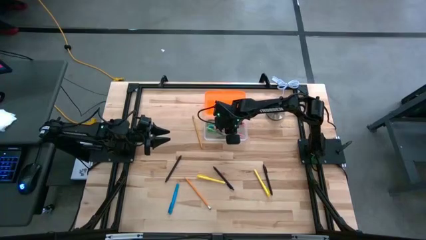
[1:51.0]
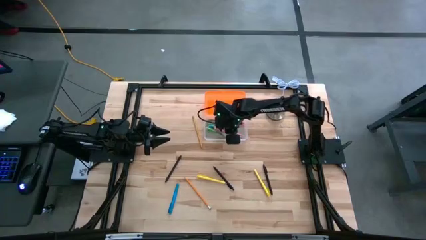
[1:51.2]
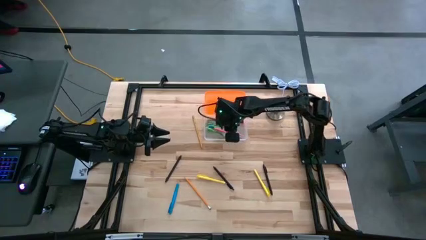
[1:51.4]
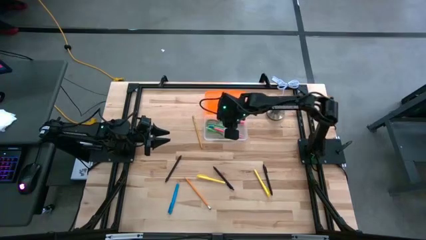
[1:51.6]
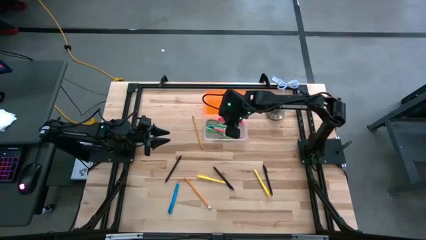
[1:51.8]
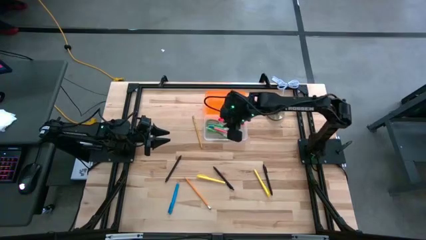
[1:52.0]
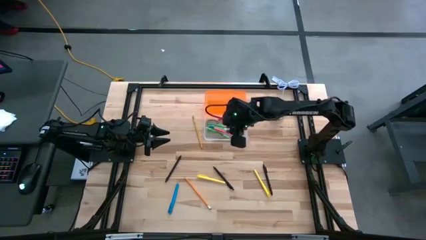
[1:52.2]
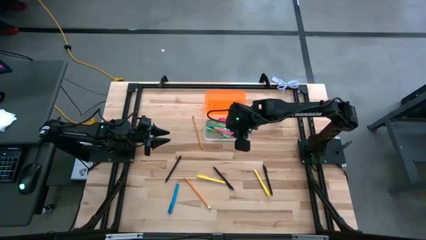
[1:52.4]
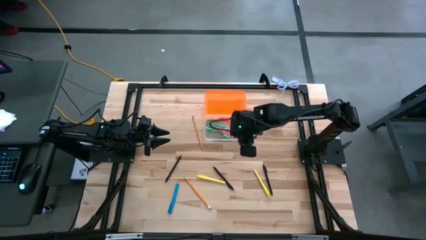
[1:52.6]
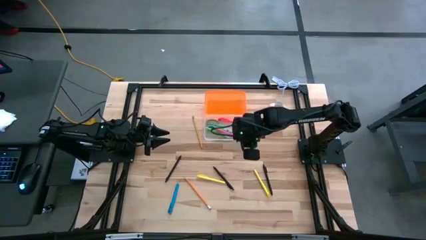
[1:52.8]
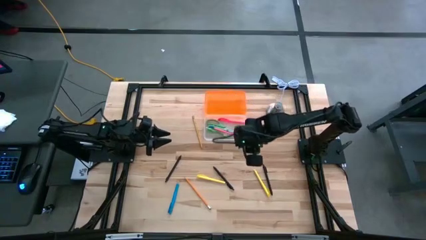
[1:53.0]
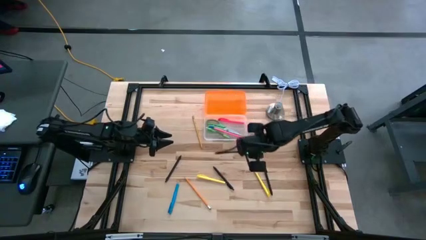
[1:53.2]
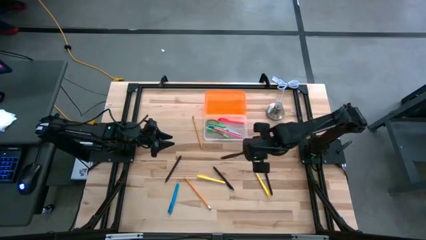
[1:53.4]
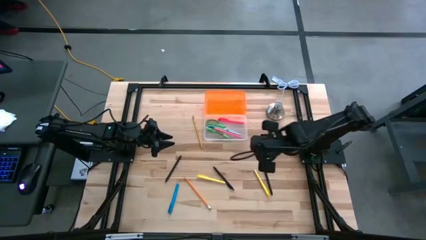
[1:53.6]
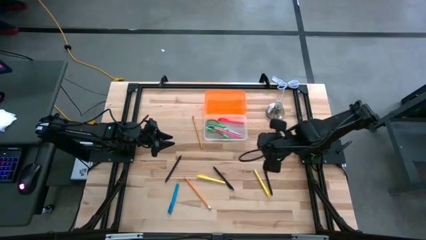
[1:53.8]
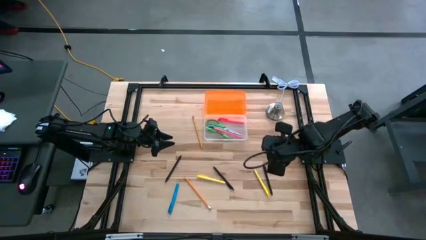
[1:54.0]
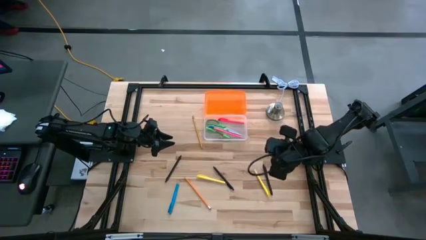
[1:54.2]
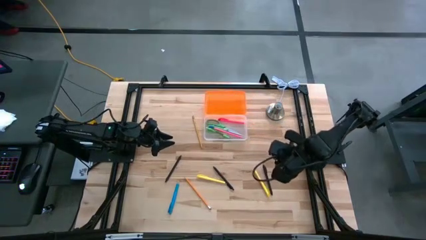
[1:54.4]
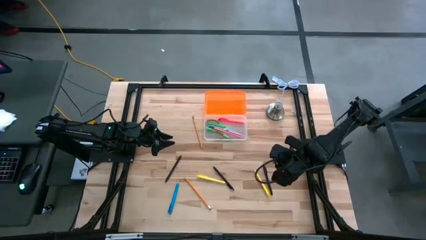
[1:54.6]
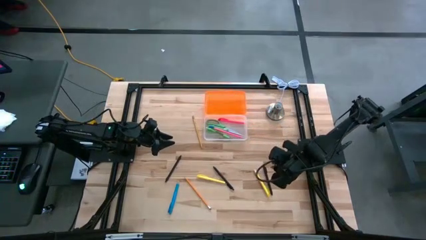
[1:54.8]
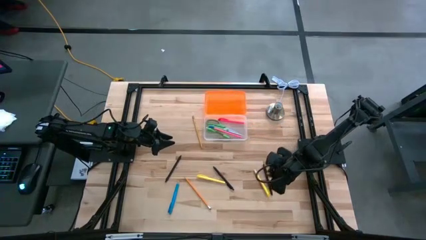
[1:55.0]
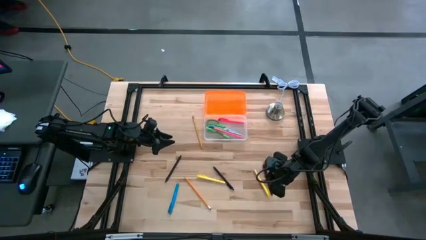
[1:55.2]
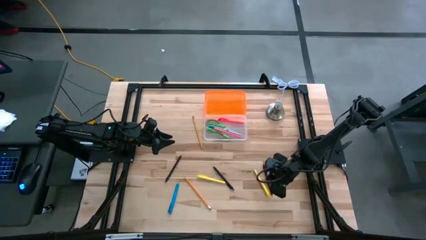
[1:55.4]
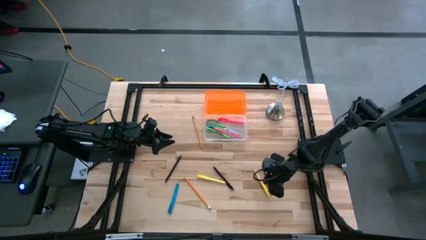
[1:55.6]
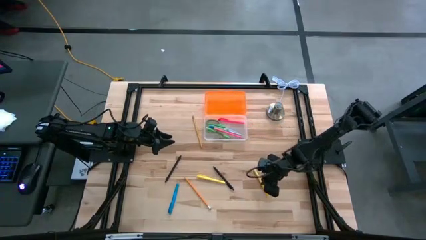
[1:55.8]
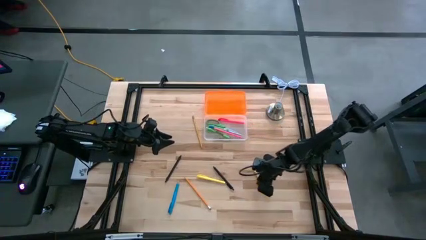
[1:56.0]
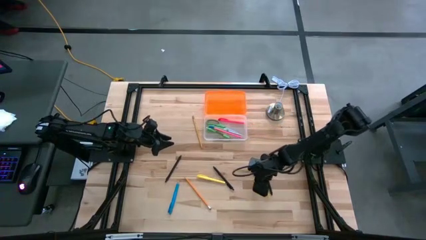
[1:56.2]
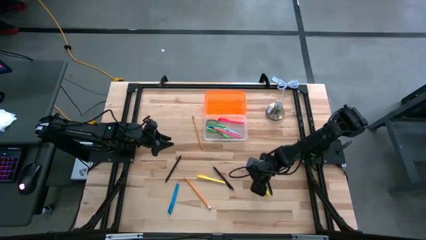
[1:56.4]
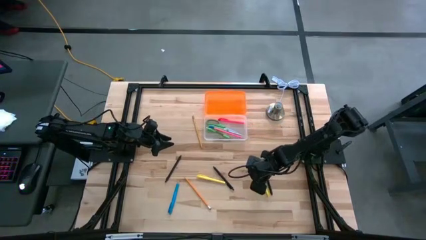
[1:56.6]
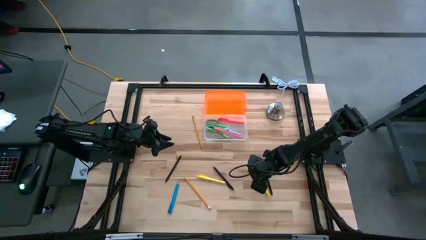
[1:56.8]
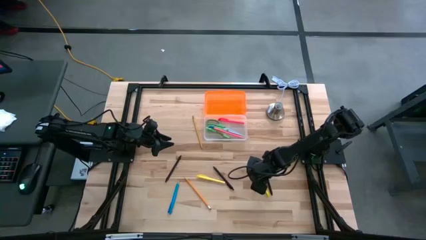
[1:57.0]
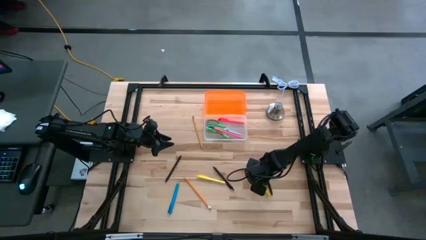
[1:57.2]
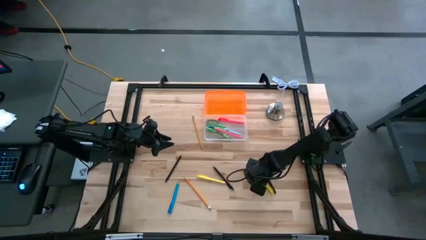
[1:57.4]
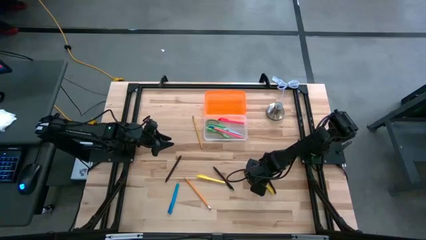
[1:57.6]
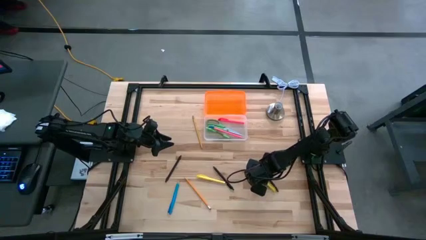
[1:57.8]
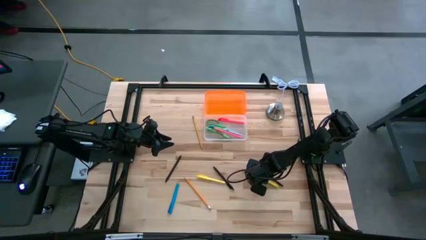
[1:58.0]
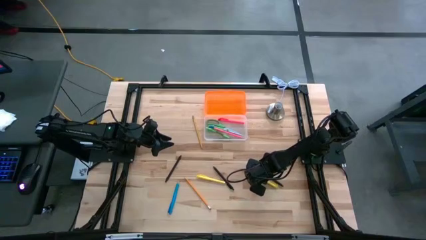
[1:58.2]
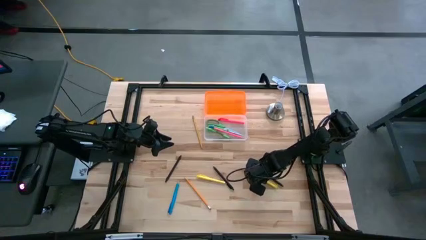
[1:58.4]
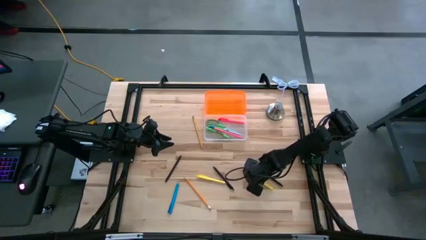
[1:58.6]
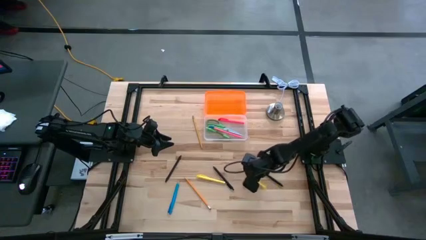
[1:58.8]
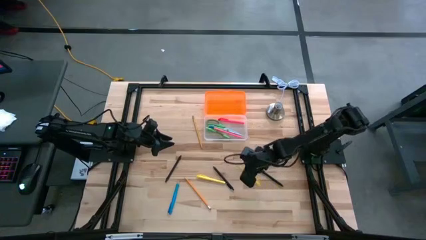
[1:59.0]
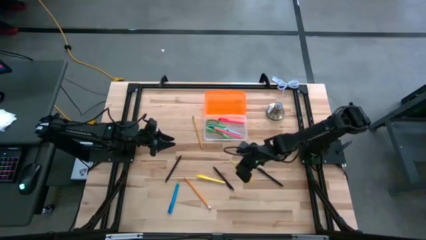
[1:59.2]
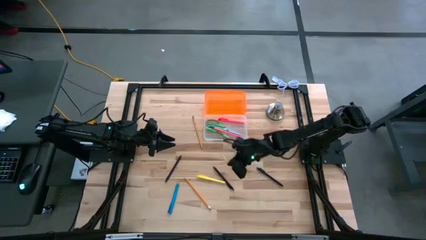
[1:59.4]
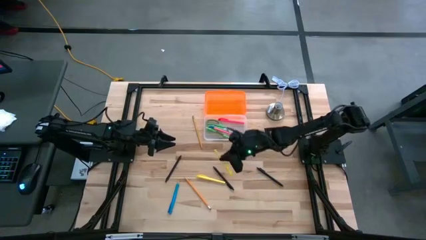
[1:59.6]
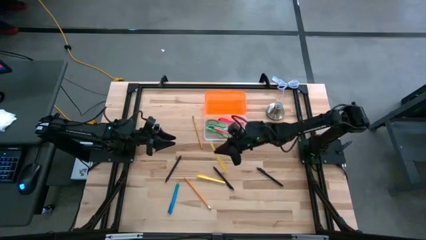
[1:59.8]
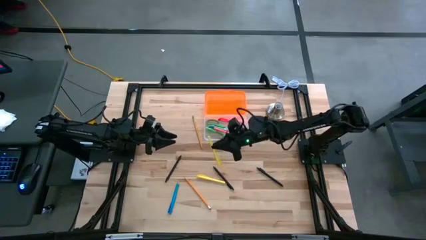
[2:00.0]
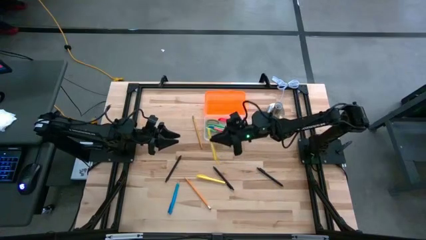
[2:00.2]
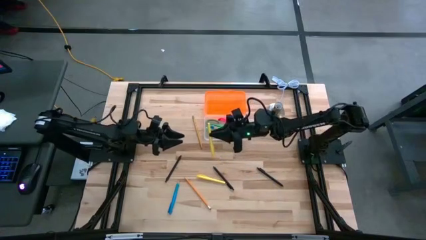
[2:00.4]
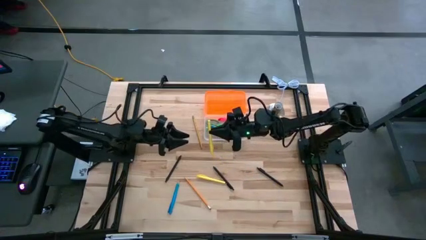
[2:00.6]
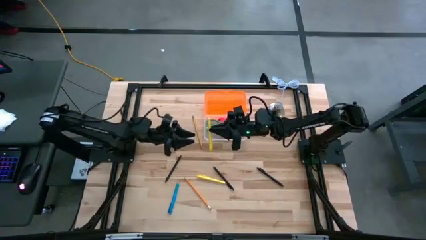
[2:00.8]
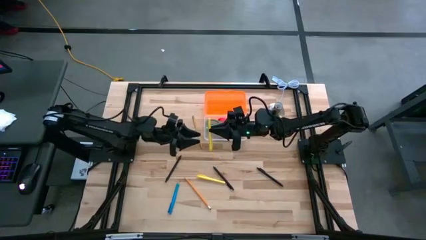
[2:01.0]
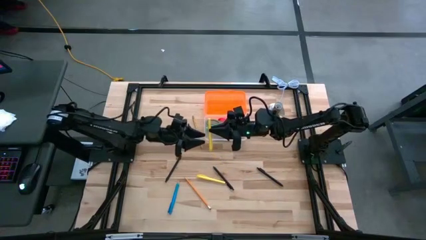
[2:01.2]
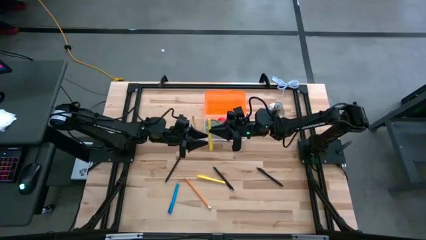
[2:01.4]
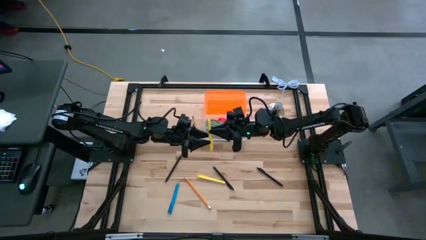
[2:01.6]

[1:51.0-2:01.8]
Task: Pick & place school supplies into a supply box
Put the right yellow highlighter into the supply box

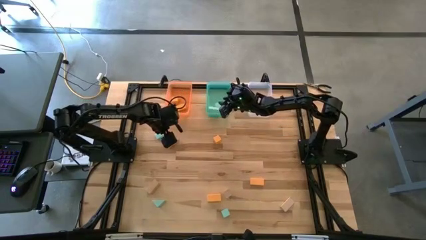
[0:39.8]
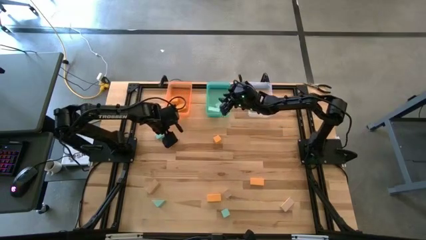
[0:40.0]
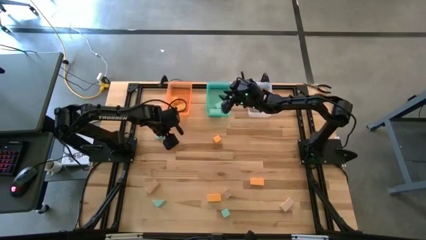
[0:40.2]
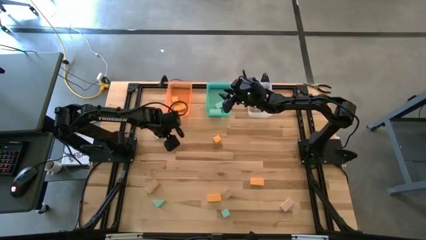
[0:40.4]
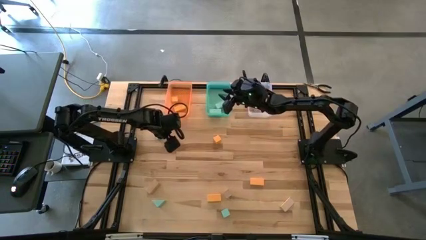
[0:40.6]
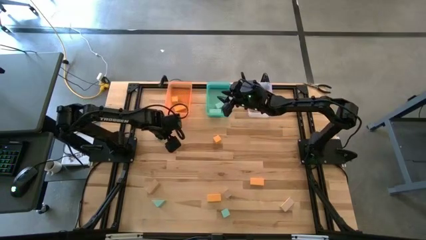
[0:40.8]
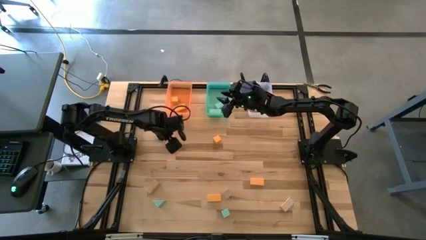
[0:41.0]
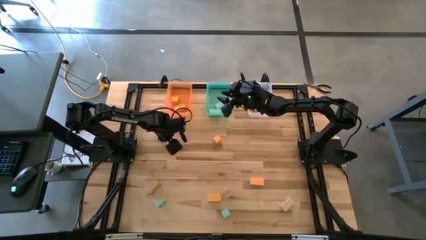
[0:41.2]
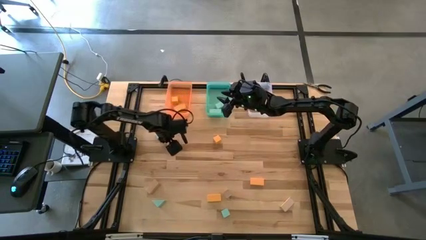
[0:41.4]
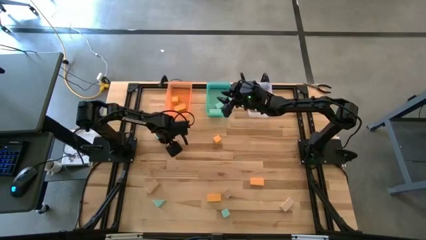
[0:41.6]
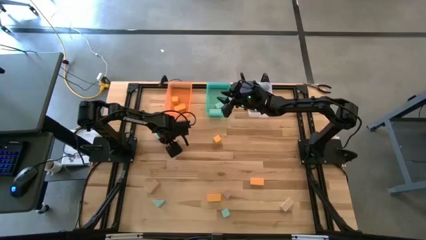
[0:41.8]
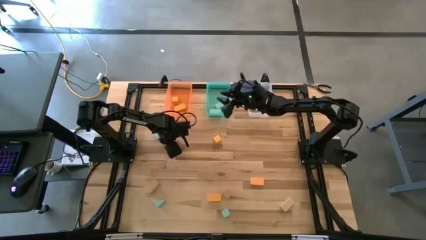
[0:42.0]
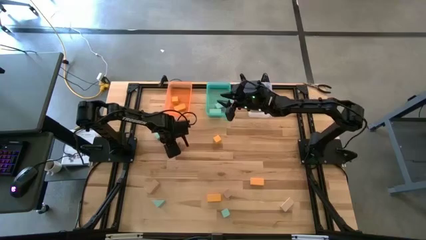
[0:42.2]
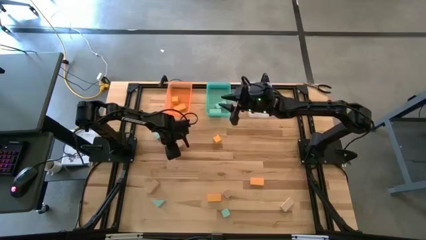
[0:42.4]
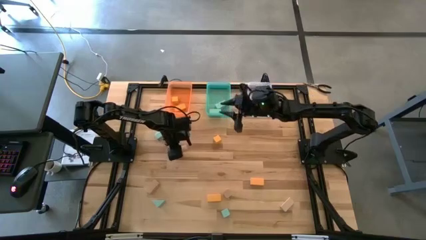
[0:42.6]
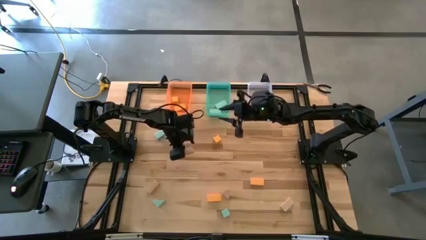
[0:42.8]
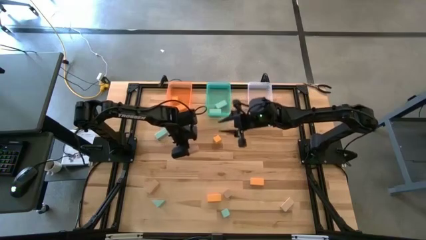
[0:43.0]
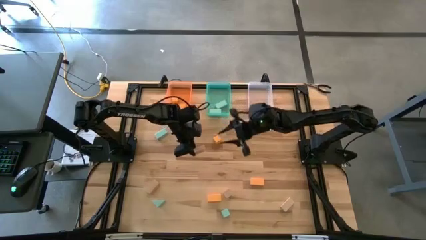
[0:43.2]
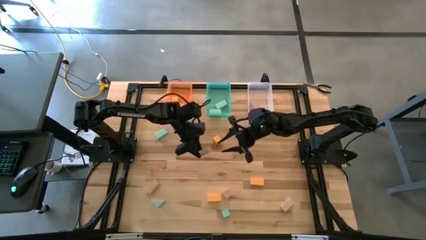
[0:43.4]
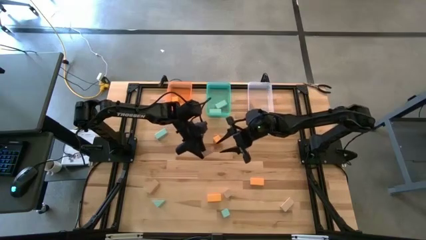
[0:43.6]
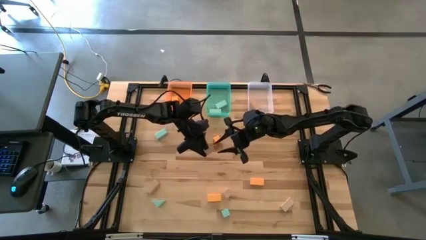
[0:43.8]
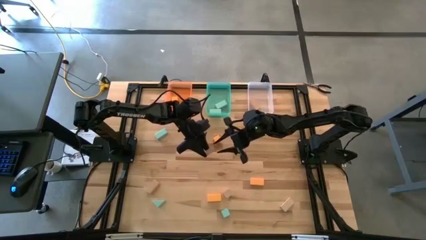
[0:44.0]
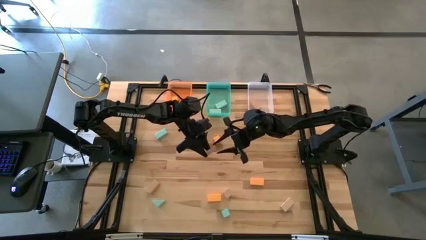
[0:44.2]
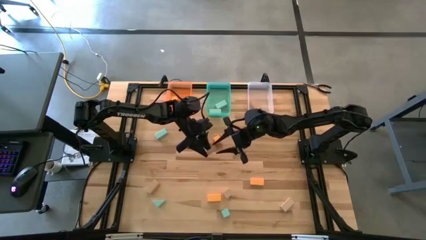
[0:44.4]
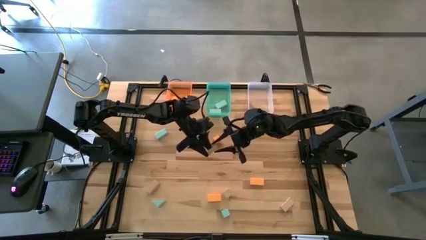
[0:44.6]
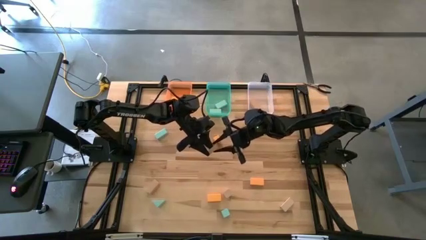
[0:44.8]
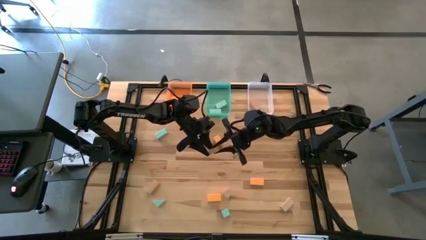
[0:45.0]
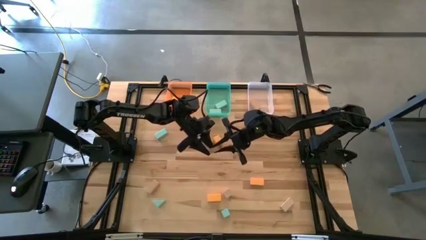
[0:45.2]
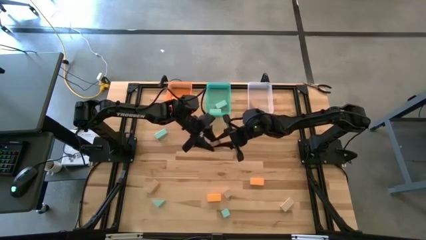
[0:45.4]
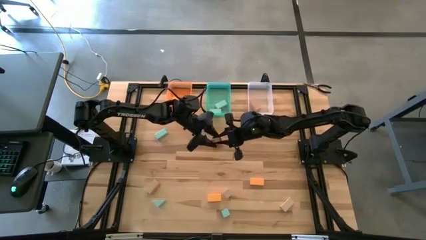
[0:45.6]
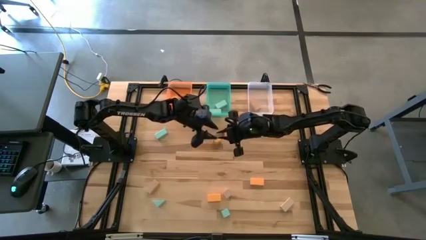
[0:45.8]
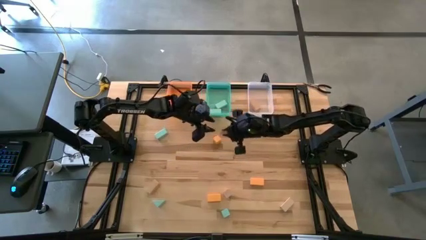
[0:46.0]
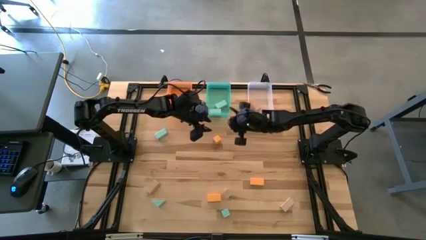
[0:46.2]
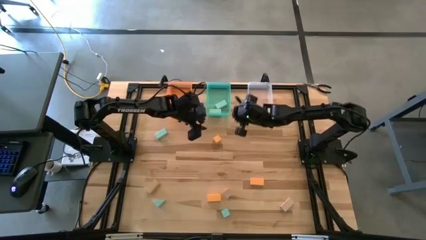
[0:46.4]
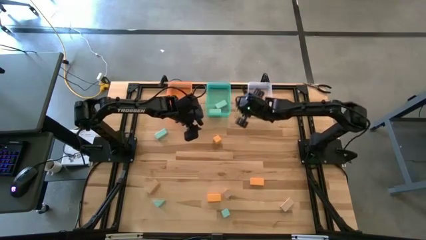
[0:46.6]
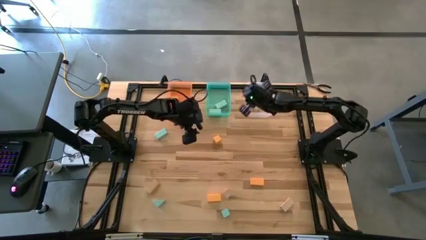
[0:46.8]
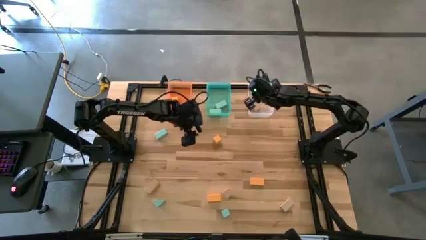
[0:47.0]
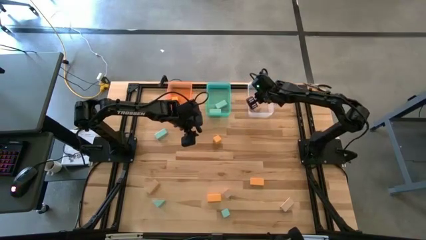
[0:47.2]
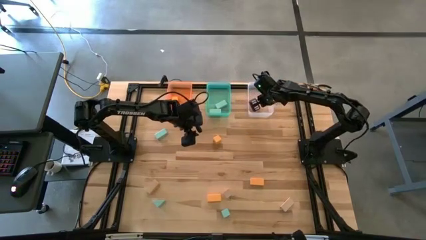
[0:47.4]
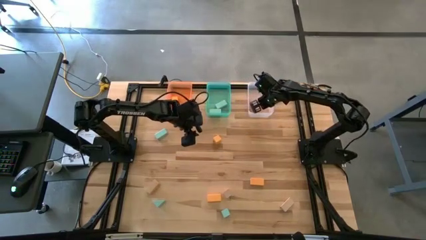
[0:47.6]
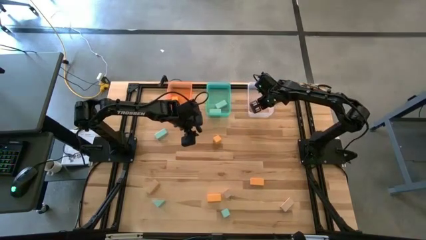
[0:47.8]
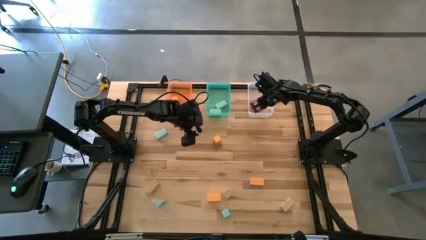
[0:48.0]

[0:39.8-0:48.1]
Task: Sort & place blocks by color
Put the brown block into the transparent bin
